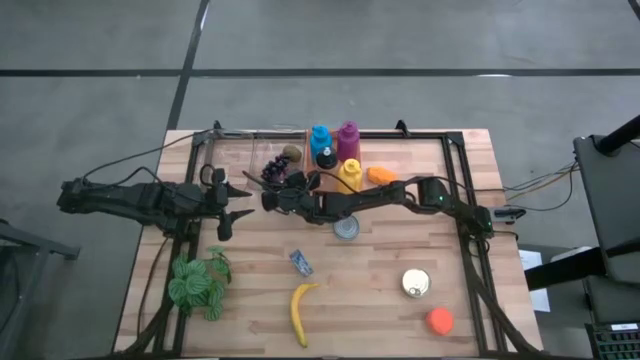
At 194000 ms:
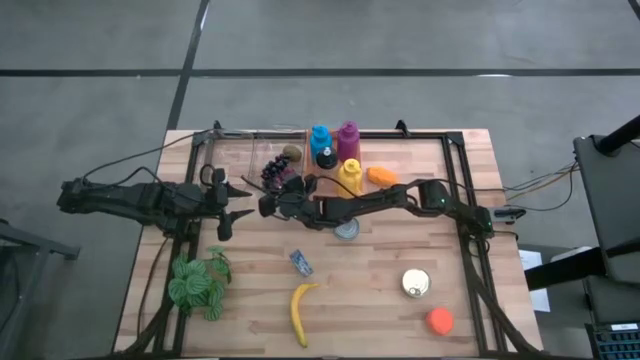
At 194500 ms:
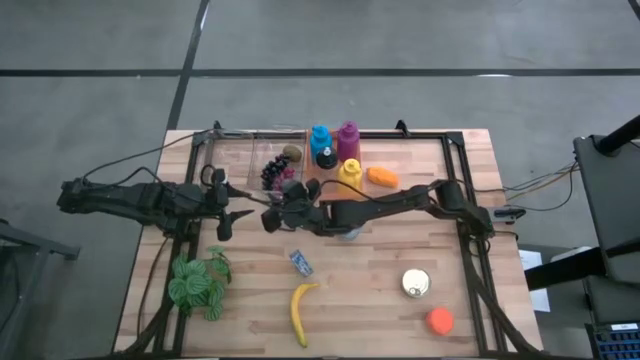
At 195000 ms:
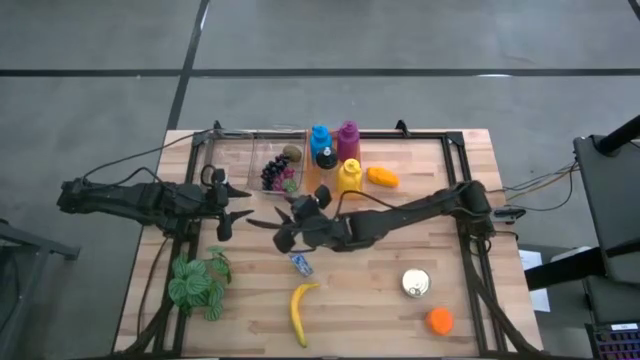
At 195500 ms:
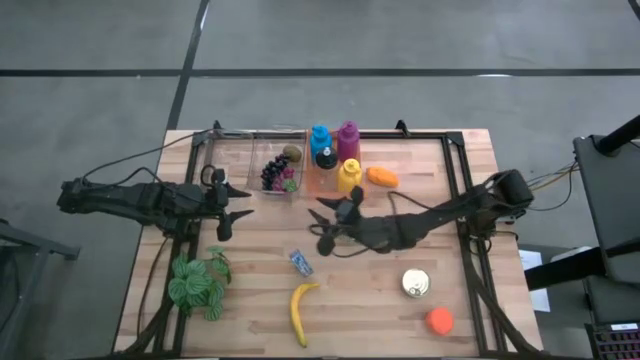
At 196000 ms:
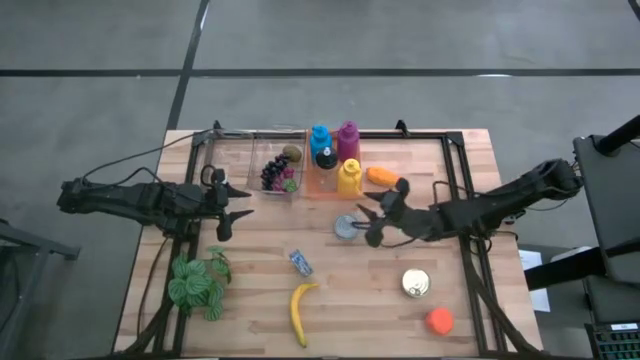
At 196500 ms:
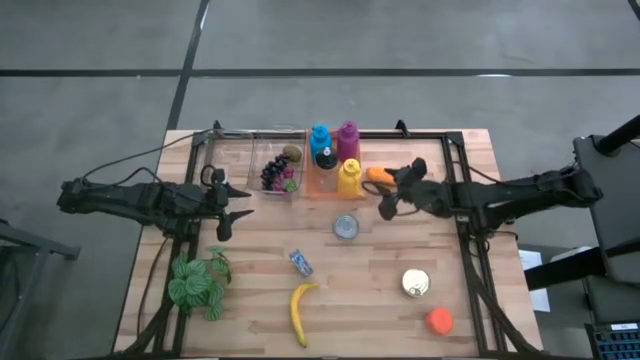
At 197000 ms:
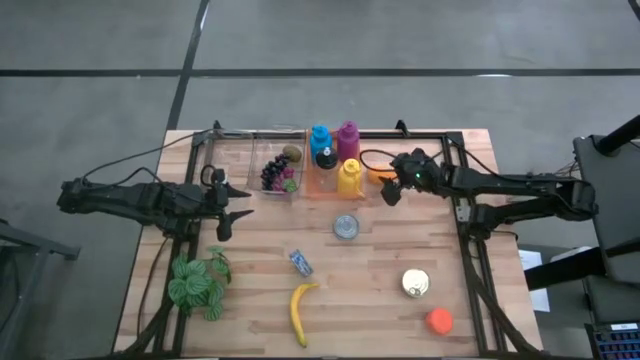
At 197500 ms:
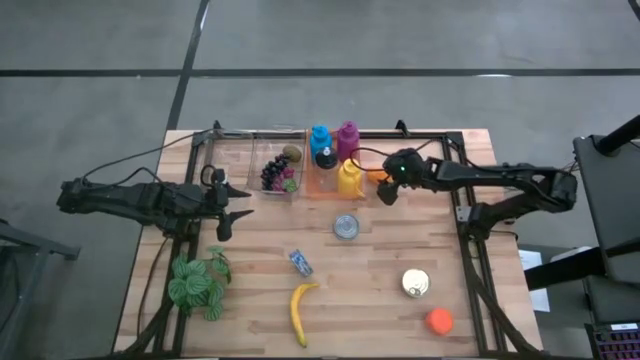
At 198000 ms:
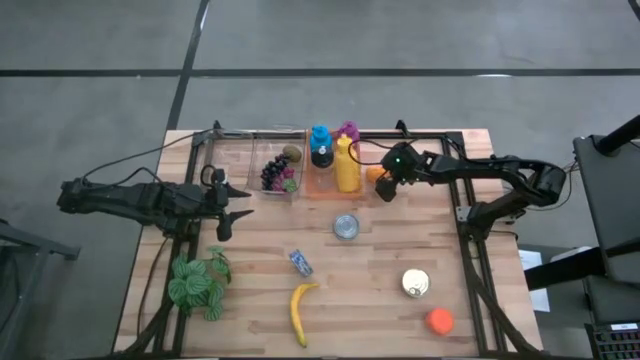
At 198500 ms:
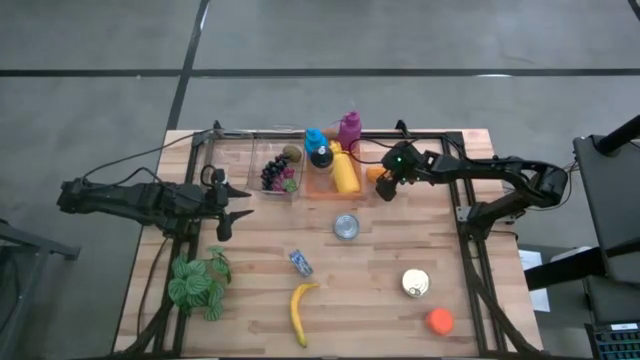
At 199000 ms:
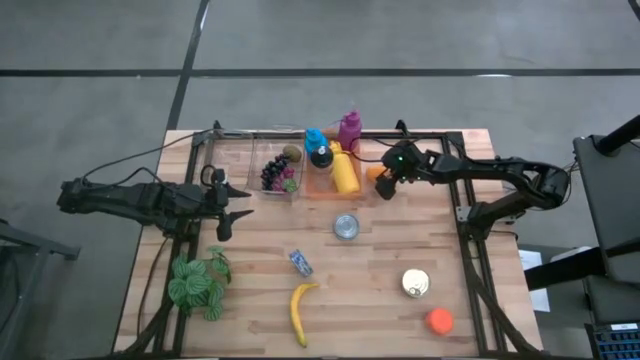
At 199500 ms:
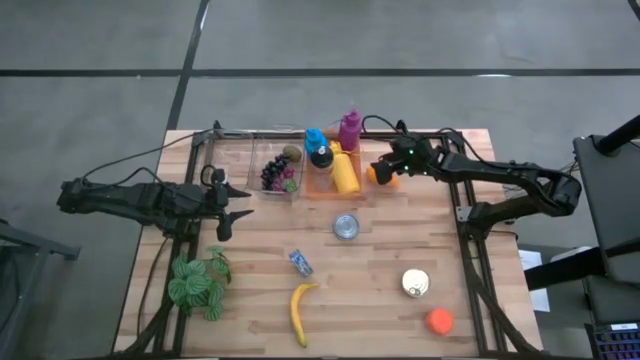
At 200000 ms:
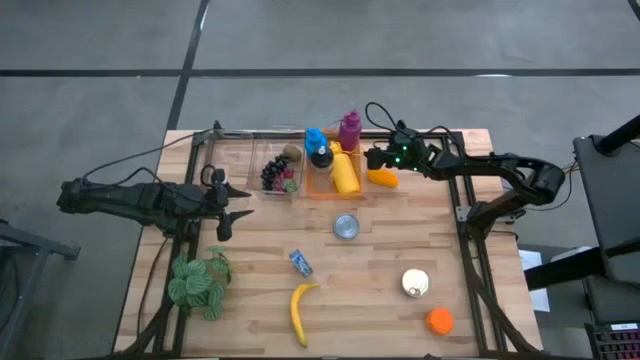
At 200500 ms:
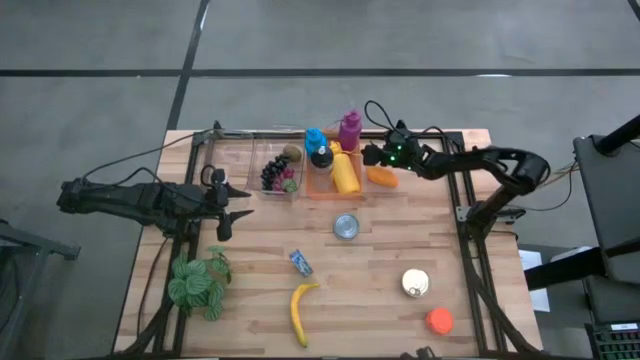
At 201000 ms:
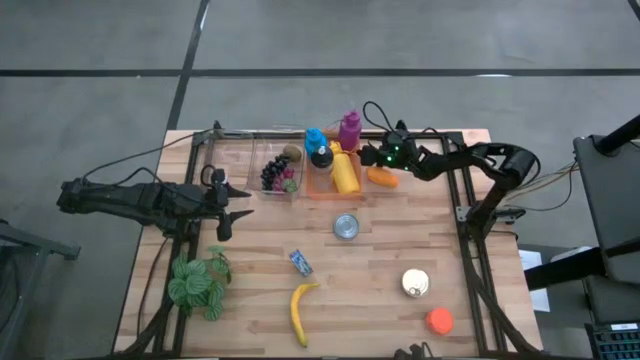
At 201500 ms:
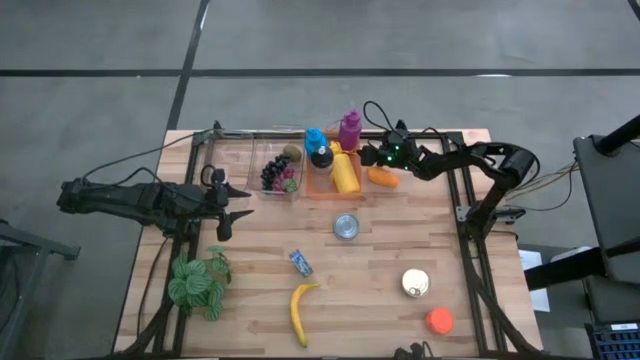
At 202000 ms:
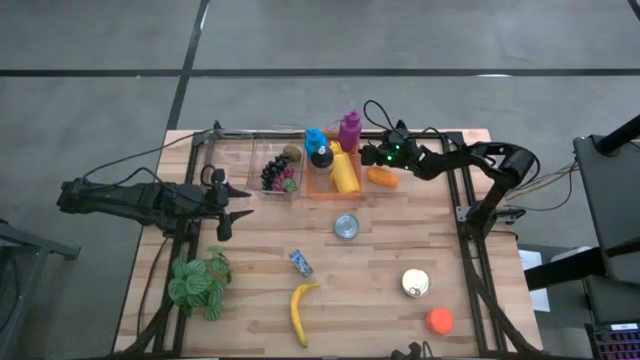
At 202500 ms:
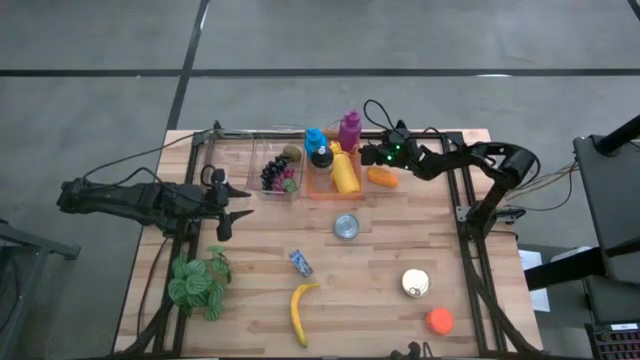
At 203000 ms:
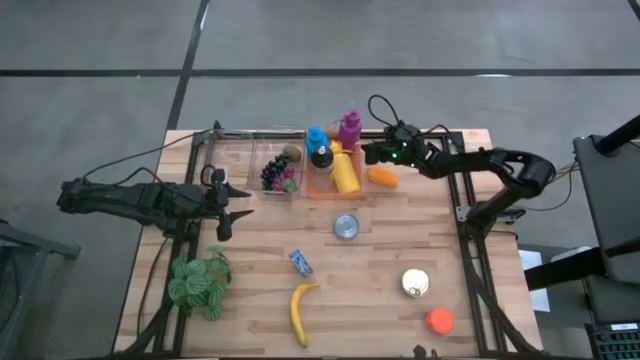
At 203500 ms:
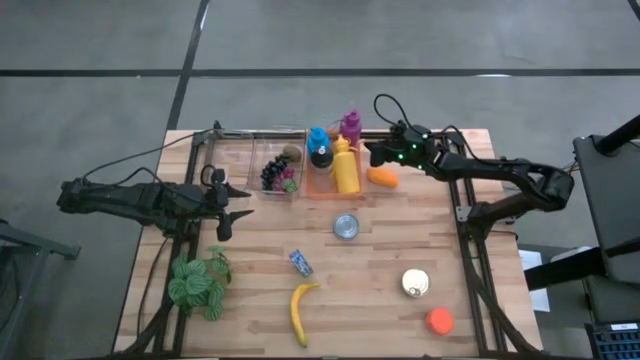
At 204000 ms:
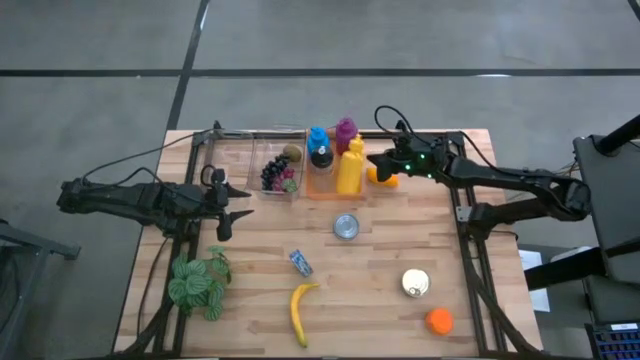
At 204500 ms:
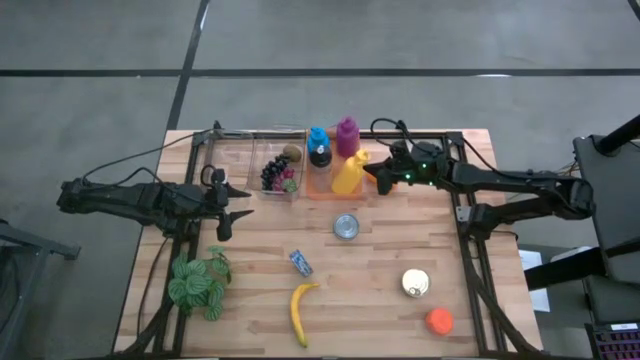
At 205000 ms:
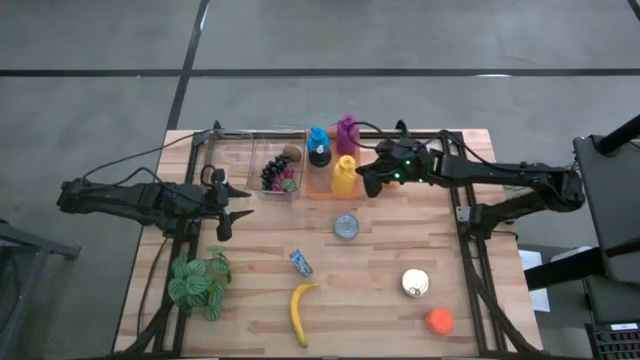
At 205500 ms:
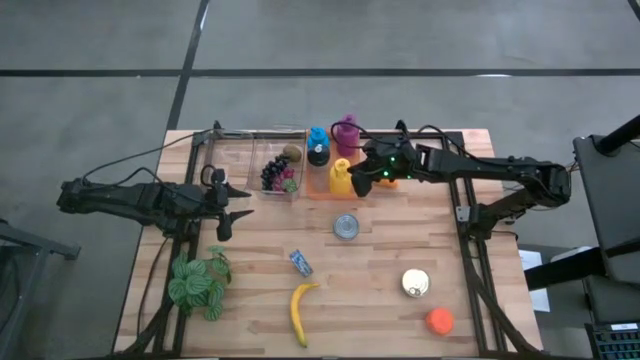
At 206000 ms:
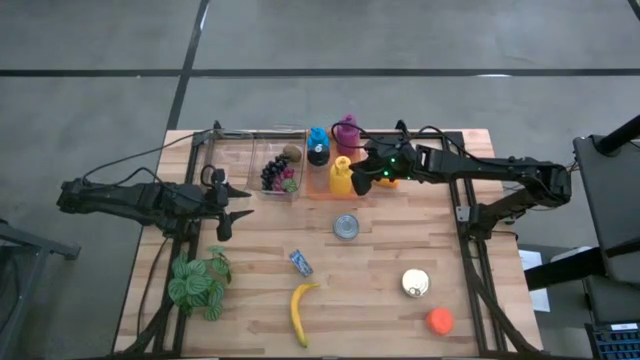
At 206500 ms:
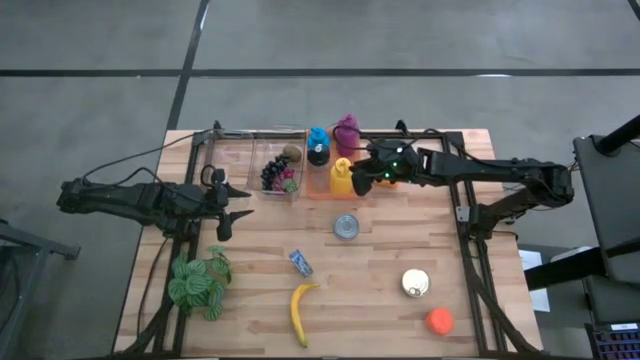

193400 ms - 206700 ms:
Task: Pick & Place Food Item
Adjust the yellow tumbler to the bin

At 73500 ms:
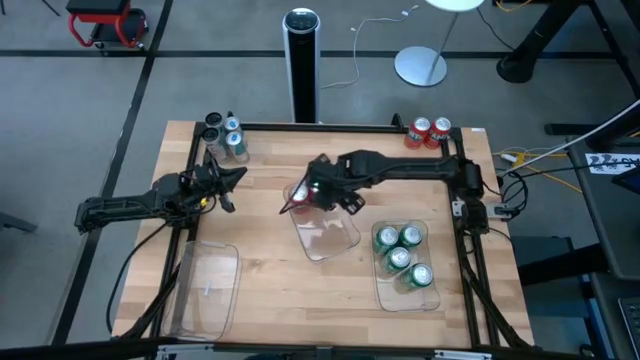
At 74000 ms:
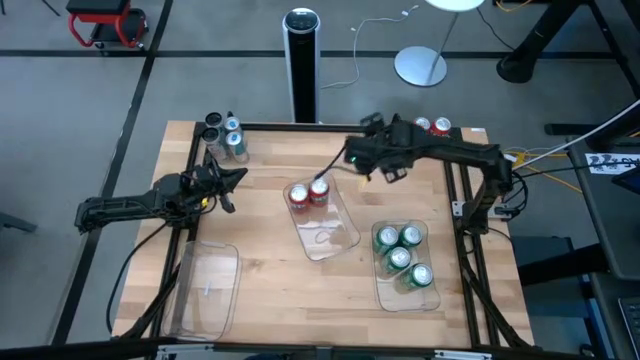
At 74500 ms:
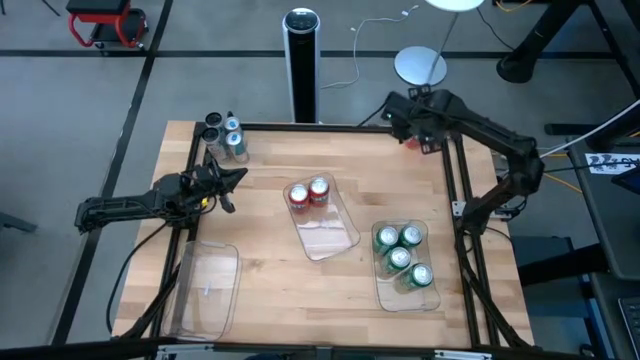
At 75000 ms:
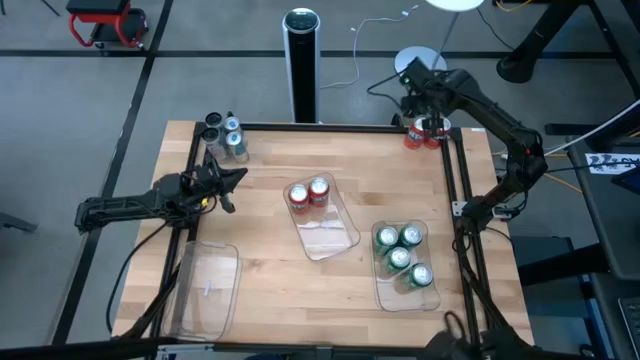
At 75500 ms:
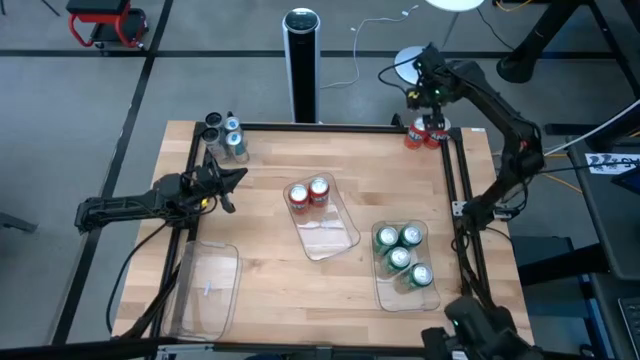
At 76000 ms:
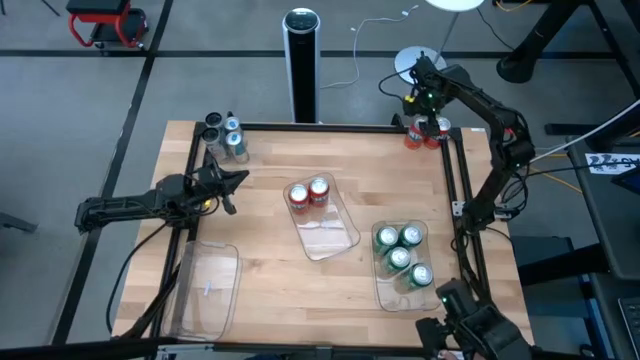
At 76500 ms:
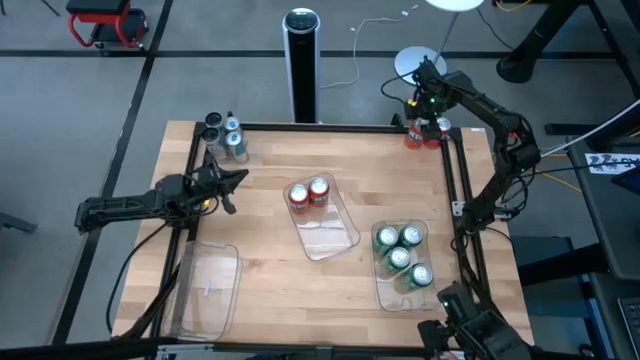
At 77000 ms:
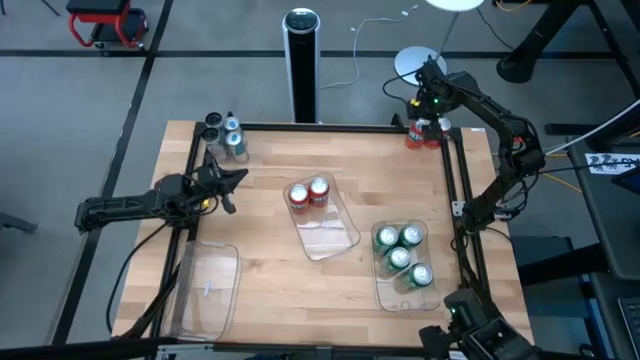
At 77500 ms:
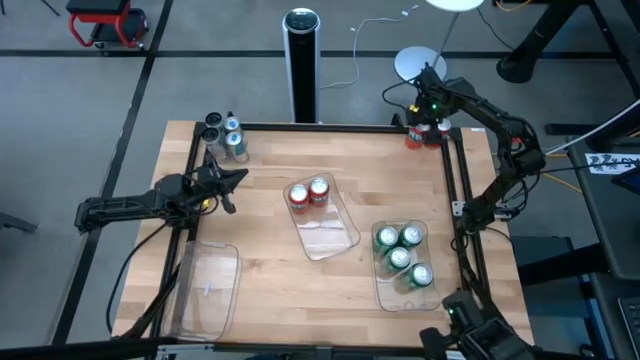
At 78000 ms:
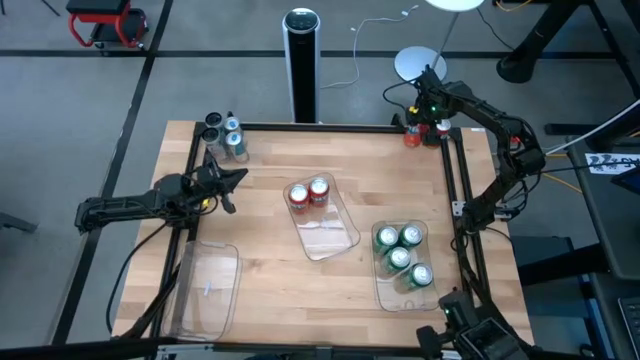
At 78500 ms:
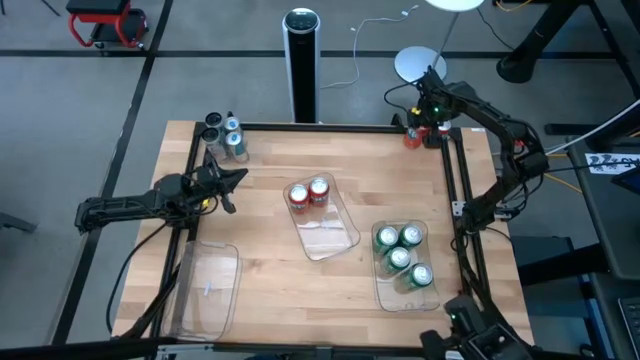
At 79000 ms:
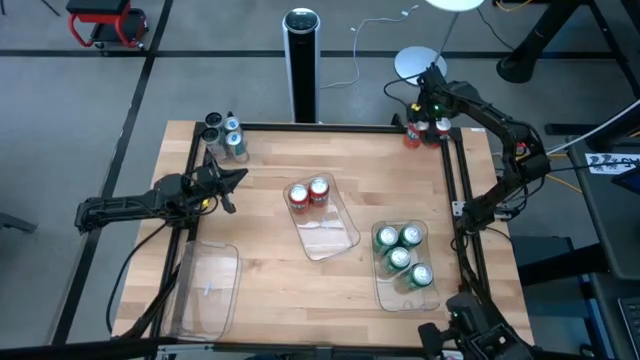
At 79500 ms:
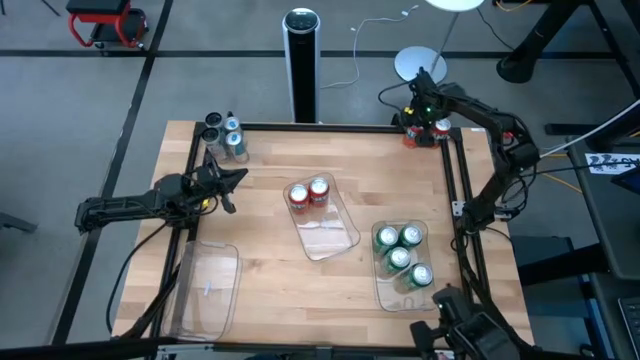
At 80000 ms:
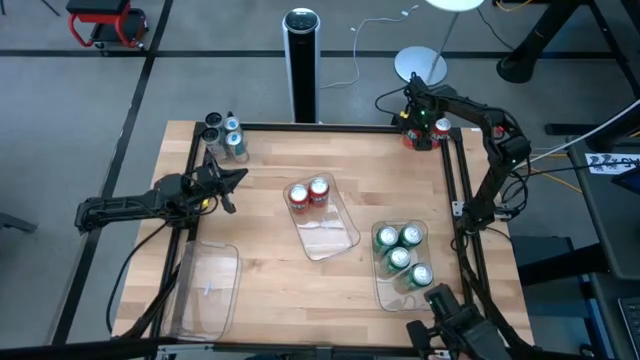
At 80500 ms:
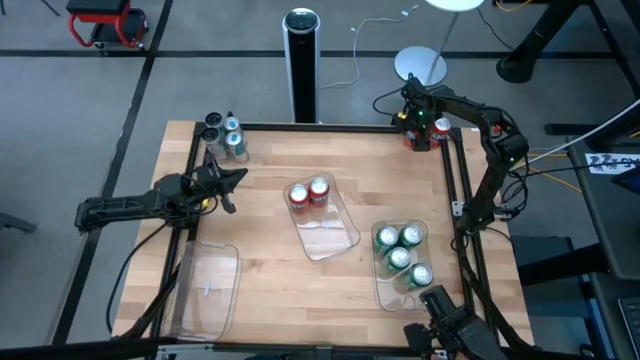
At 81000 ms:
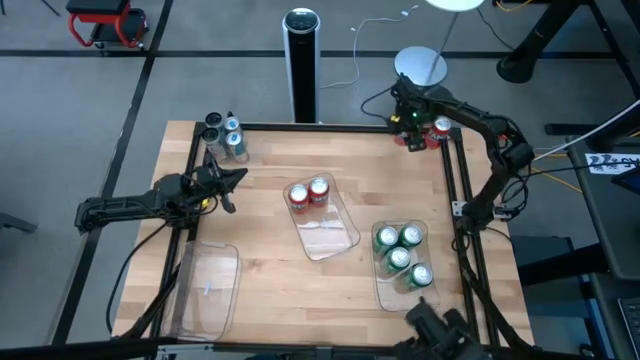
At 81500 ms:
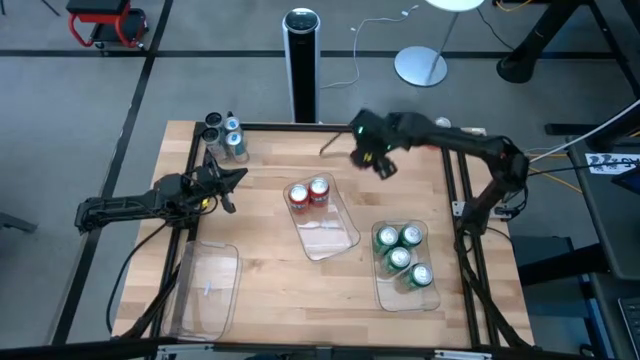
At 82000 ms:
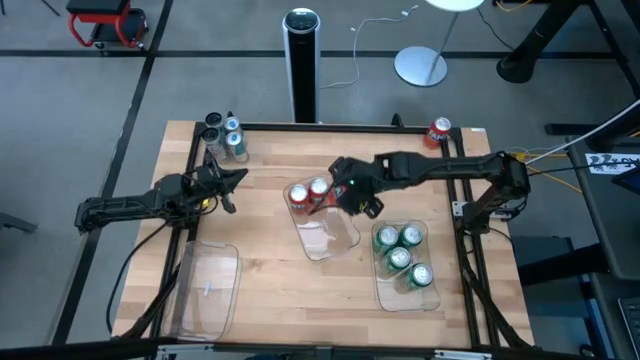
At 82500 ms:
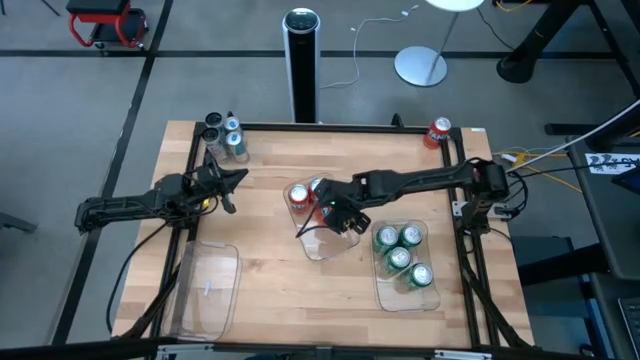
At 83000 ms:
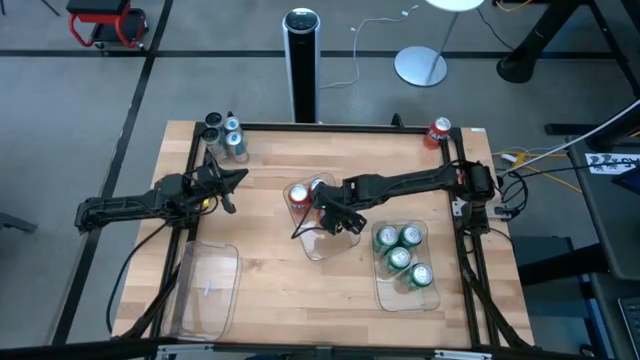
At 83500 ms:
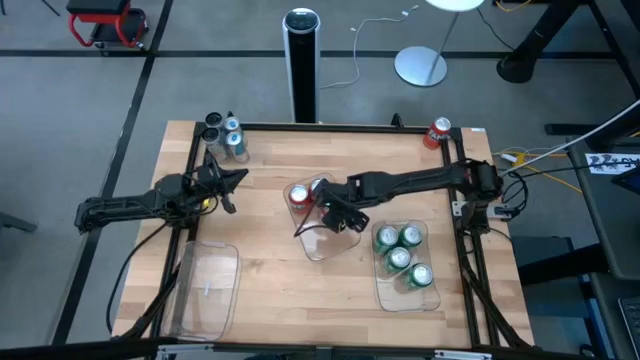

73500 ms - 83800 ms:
Task: Sort soda cans
Put the left orange soda can into the middle transparent bin
